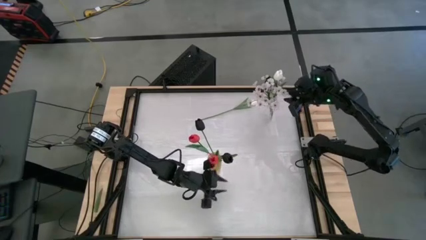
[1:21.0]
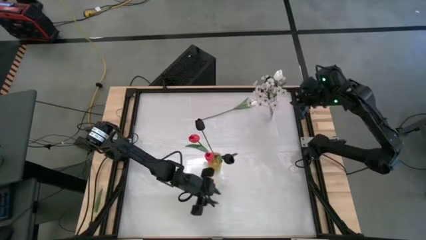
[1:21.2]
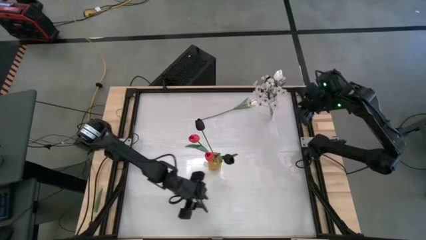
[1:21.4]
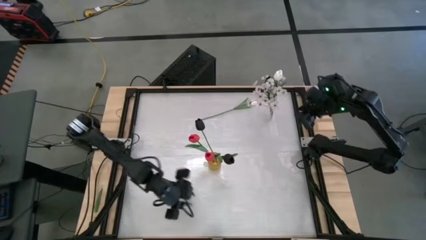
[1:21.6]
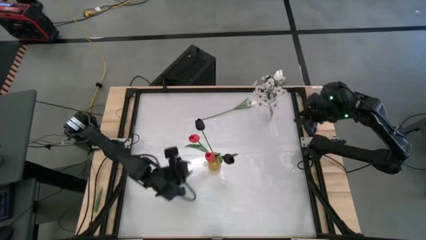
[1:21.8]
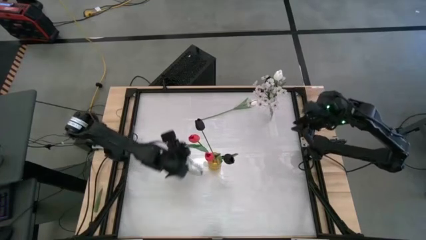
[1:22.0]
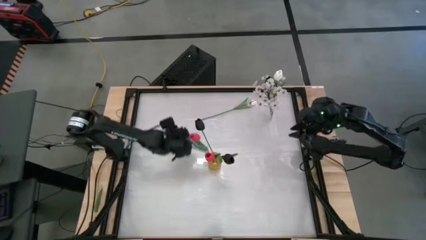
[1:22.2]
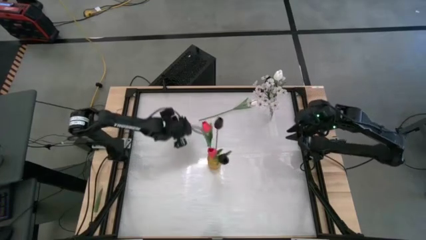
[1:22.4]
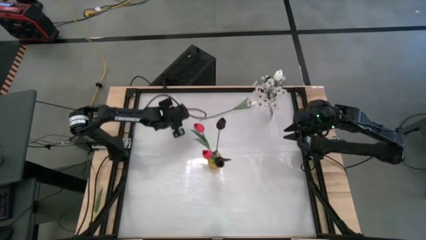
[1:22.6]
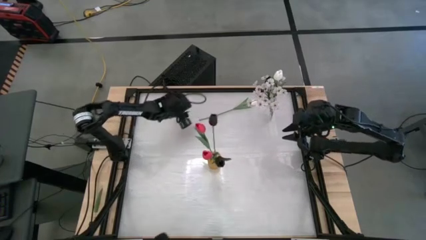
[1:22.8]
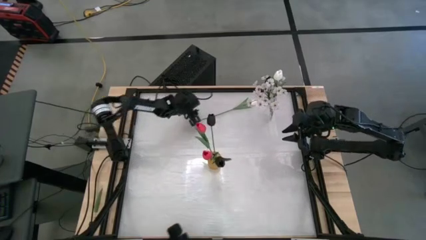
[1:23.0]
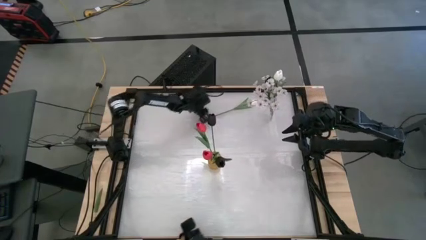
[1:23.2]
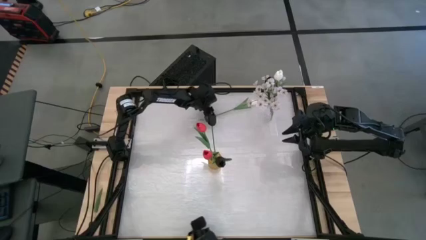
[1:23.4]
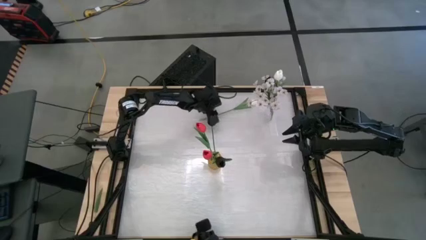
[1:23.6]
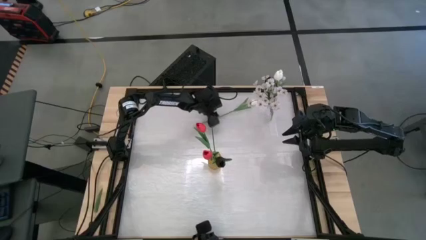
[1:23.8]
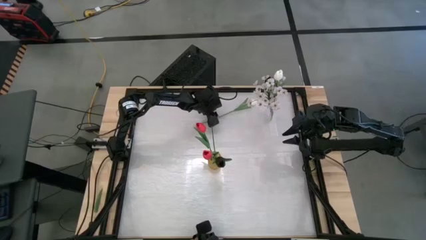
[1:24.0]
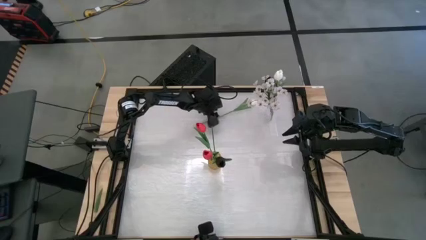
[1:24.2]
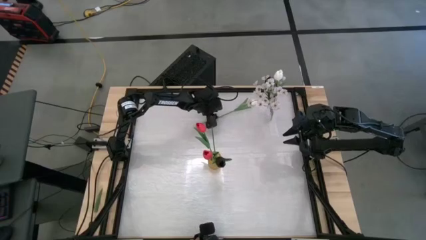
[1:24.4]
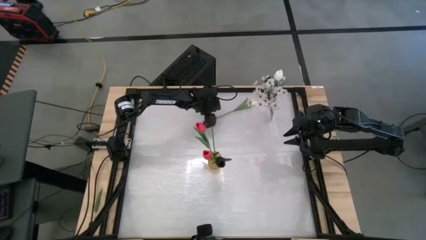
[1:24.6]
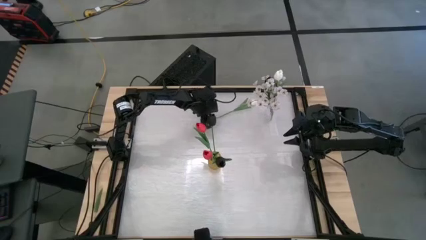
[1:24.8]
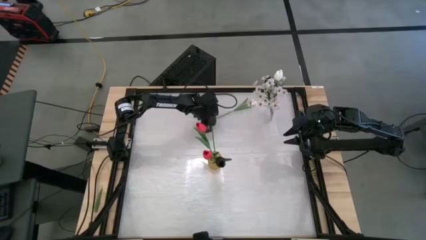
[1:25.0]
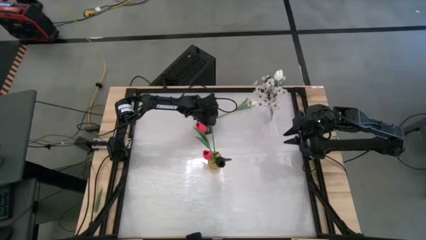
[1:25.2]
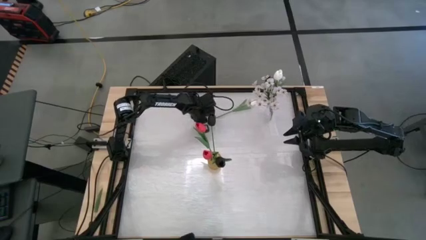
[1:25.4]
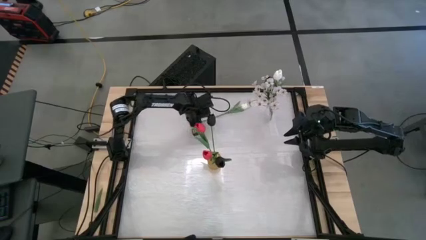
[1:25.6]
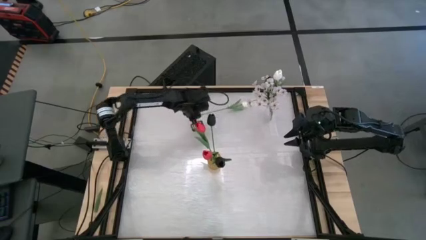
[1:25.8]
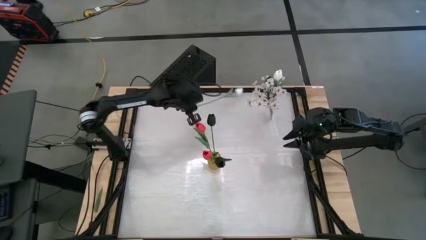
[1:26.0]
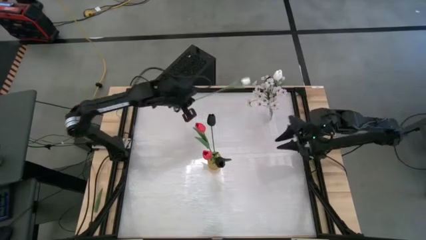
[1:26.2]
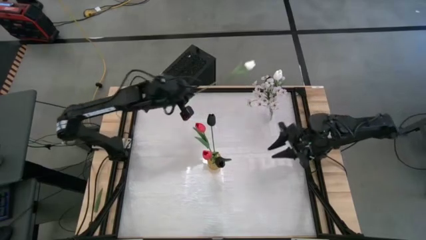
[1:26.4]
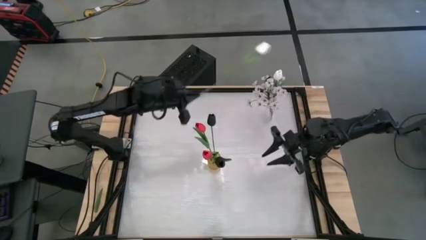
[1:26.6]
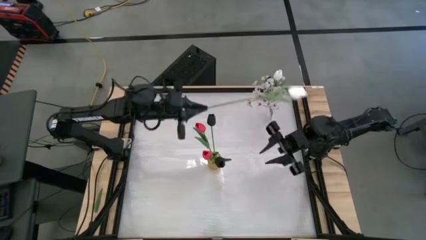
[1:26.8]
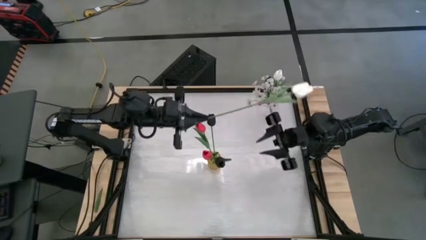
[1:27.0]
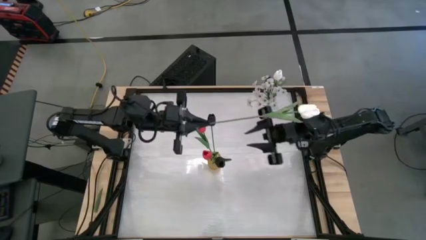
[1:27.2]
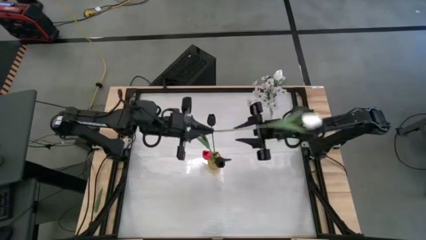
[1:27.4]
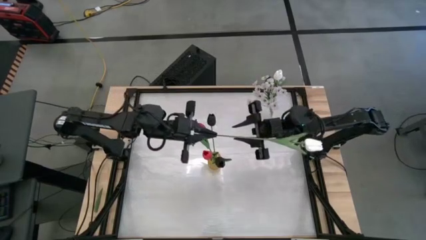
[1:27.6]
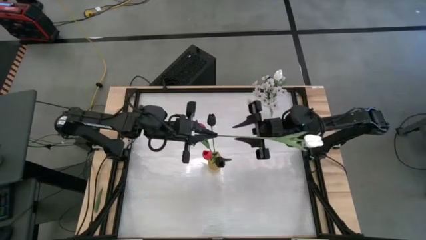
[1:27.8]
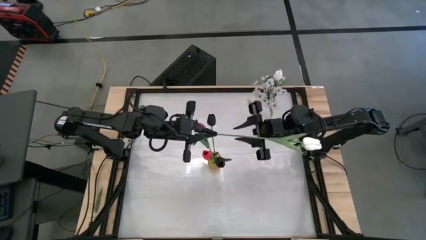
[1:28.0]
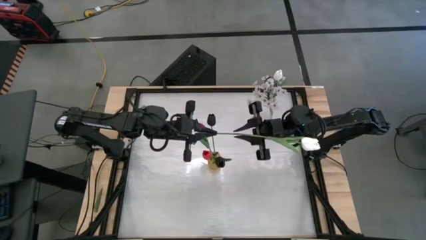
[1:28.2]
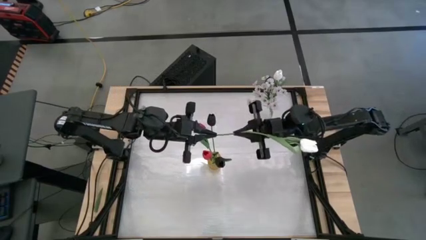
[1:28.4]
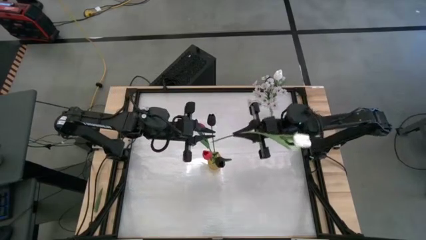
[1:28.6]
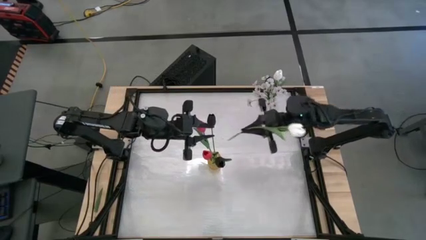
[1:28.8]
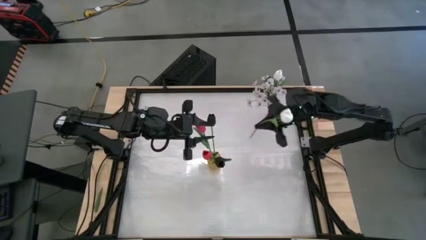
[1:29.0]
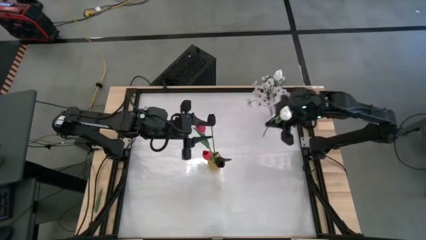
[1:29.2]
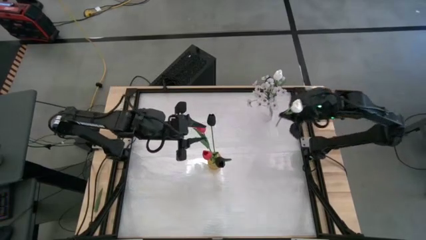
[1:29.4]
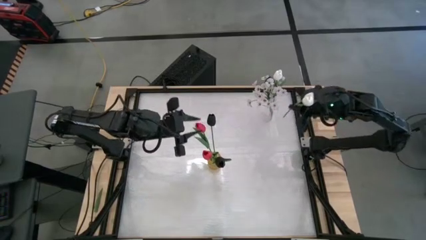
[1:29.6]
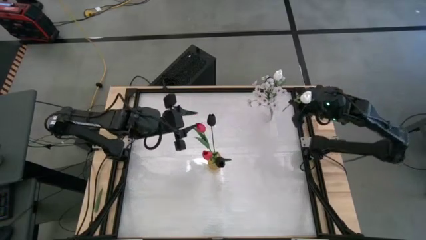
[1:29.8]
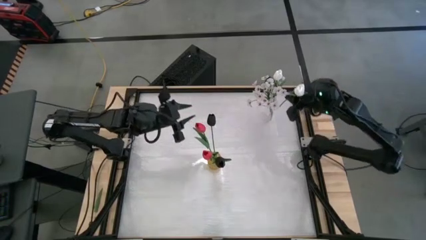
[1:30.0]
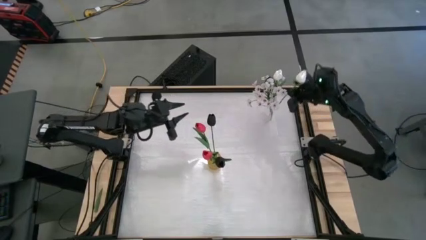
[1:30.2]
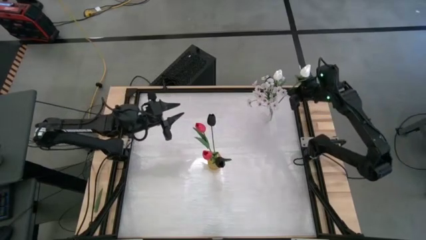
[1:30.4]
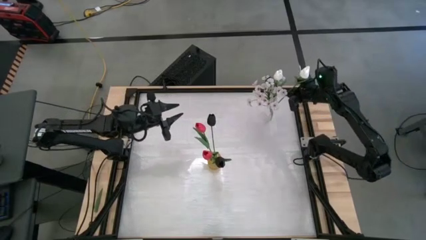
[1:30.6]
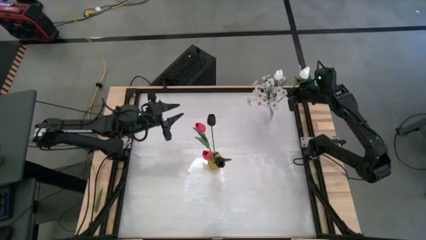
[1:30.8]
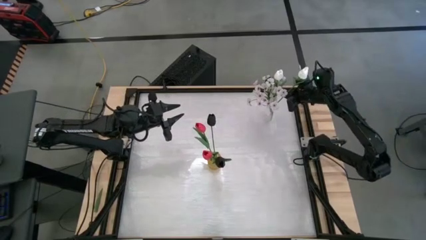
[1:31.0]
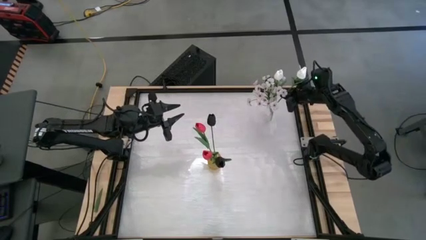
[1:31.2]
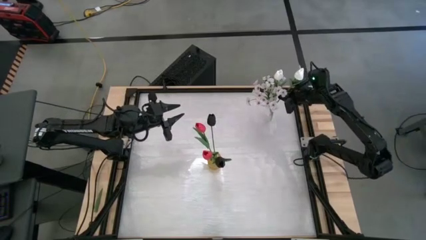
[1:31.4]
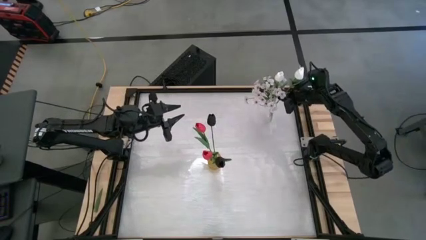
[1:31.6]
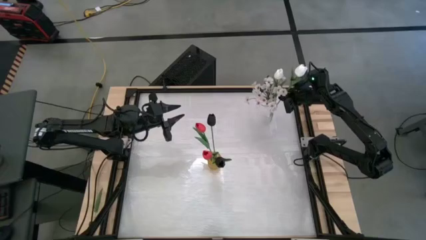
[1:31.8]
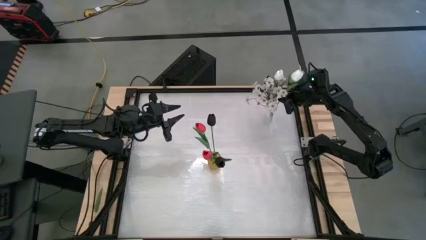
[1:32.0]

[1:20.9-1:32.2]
Task: Sort flowers into vase by color
Put the white tulip into the transparent vase

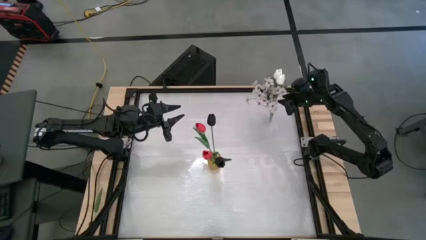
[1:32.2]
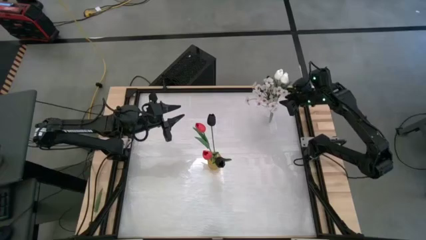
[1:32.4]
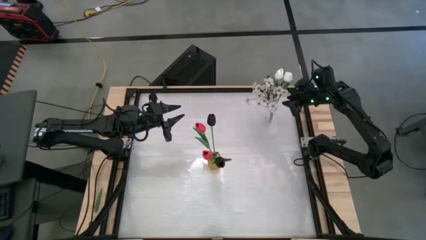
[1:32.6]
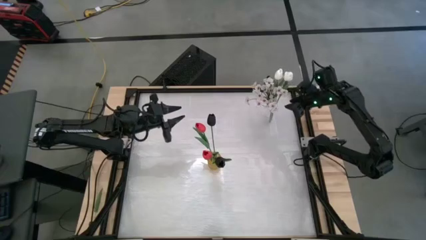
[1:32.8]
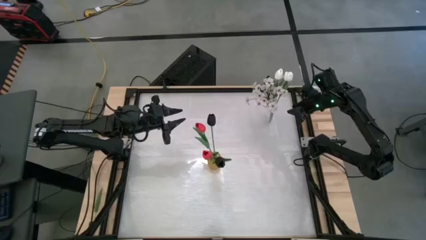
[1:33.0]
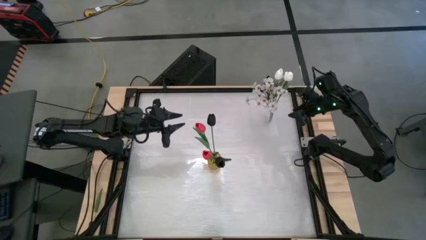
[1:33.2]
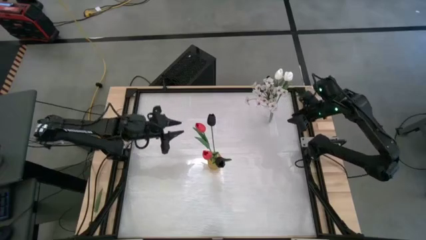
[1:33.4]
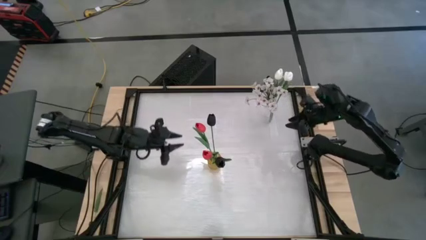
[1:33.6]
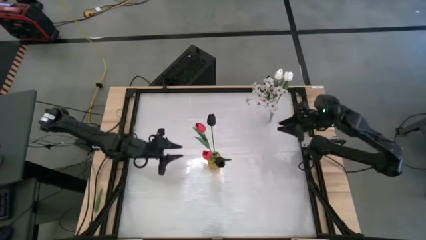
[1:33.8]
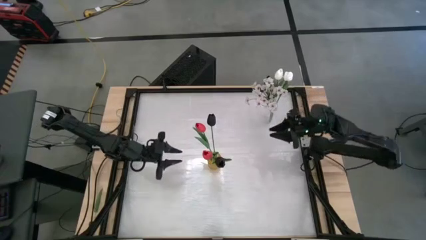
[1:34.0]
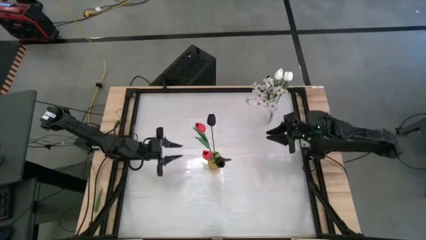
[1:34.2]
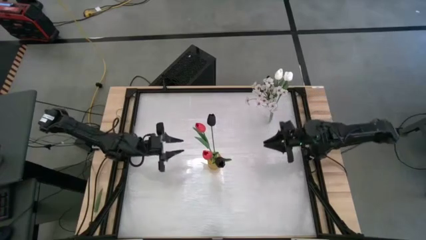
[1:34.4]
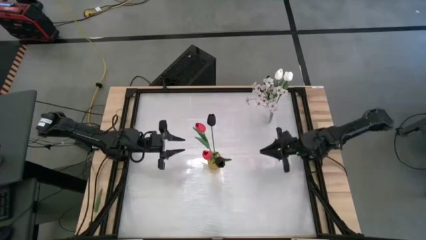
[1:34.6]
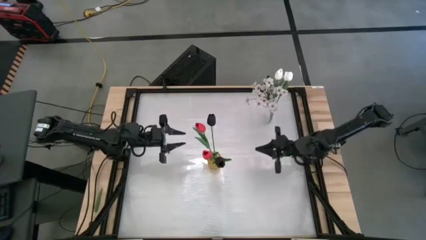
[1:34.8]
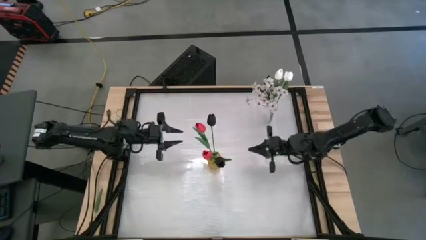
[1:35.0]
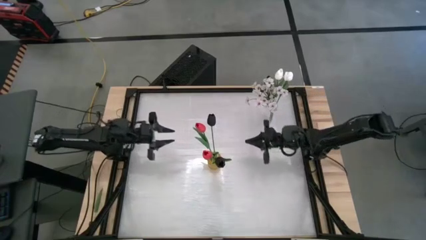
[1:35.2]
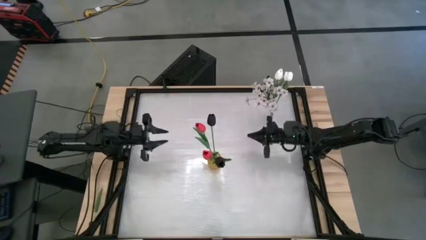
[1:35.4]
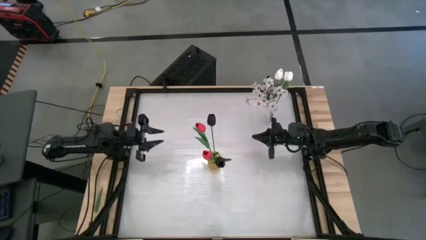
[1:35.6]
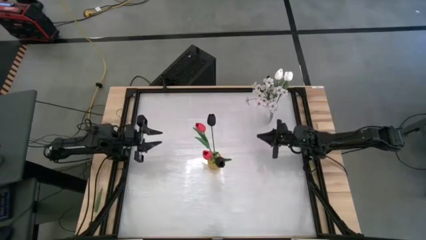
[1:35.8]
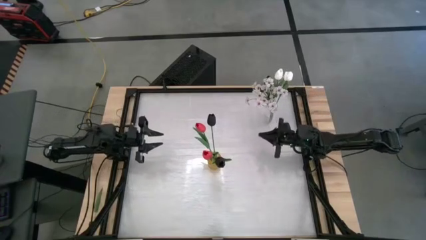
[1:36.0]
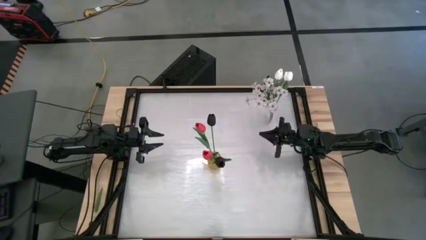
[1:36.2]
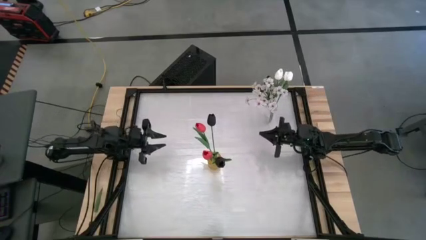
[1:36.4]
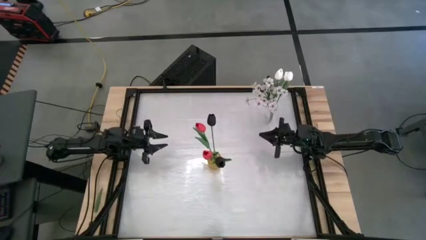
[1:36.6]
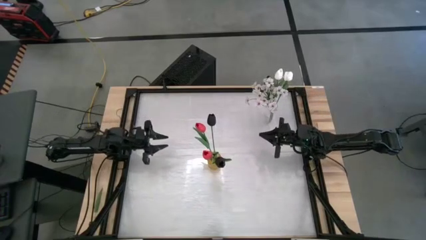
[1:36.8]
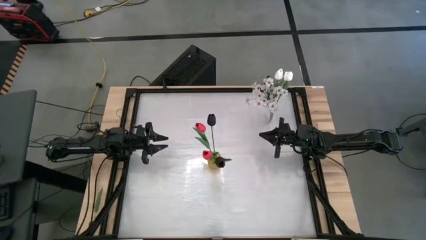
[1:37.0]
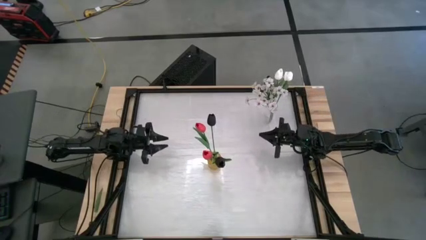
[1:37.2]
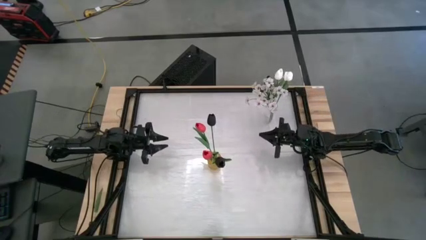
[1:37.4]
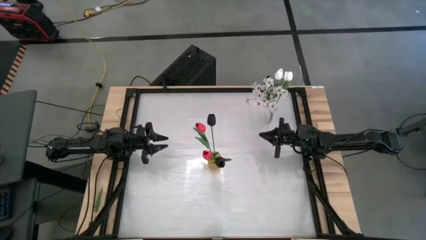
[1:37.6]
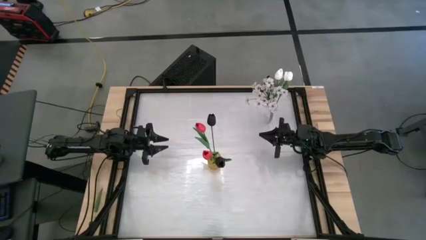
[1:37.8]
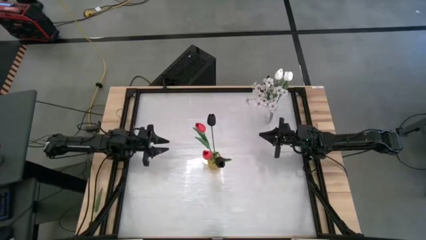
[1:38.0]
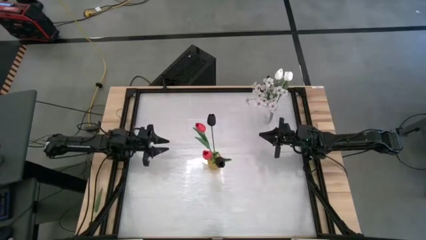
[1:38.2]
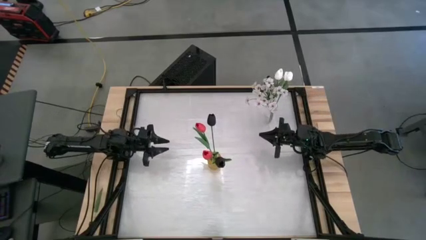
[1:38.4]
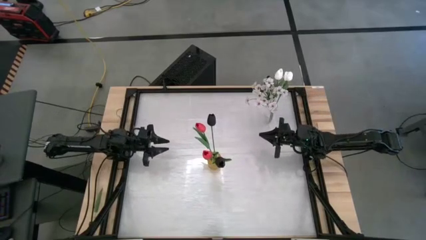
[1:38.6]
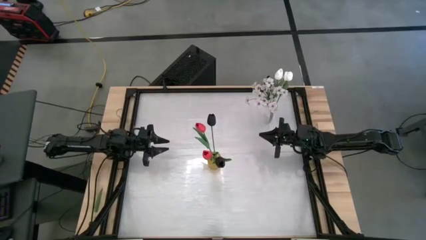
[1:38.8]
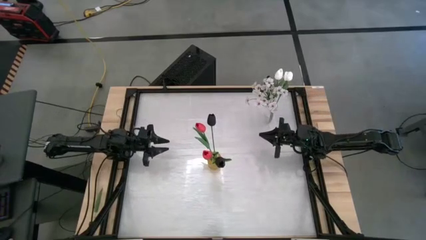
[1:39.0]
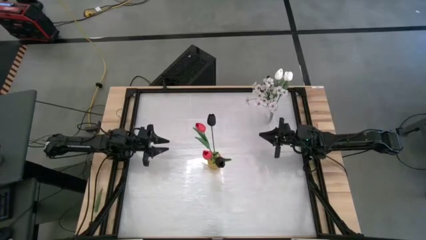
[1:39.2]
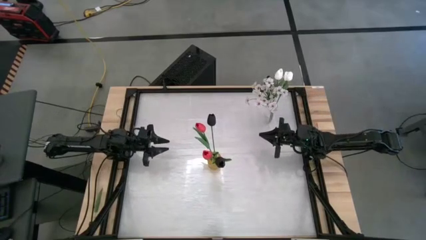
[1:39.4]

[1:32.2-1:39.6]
Return to Home Position
